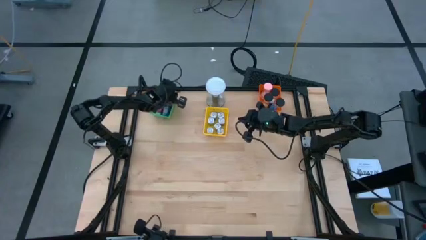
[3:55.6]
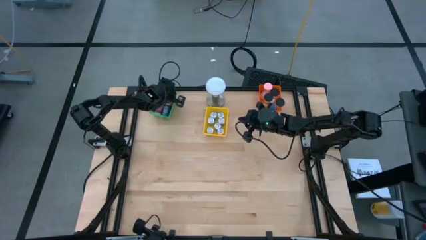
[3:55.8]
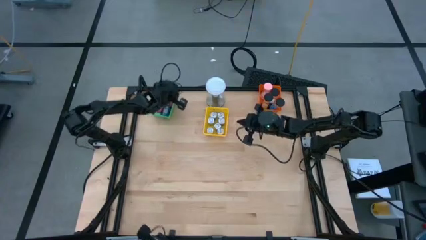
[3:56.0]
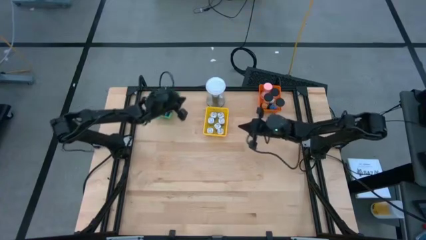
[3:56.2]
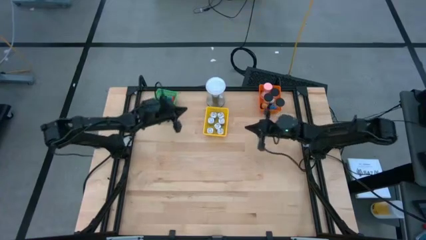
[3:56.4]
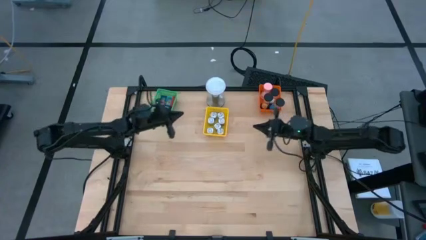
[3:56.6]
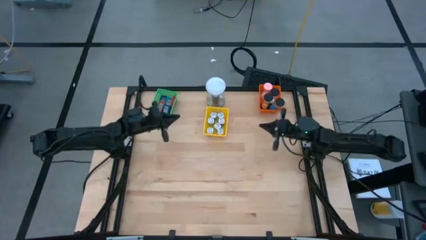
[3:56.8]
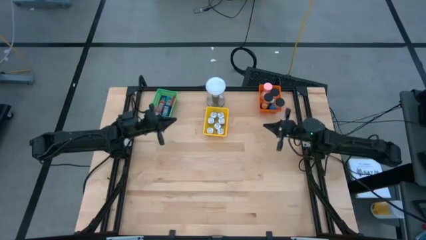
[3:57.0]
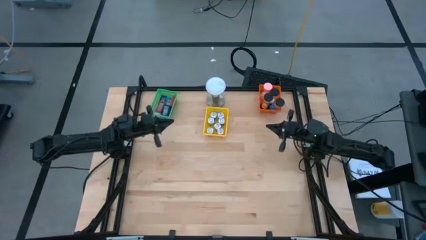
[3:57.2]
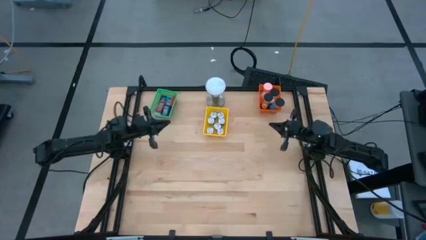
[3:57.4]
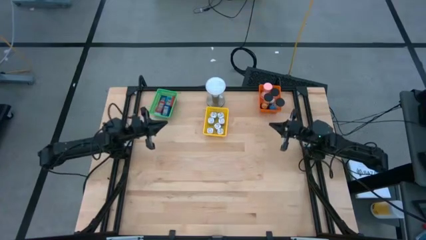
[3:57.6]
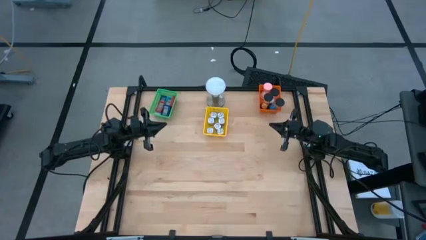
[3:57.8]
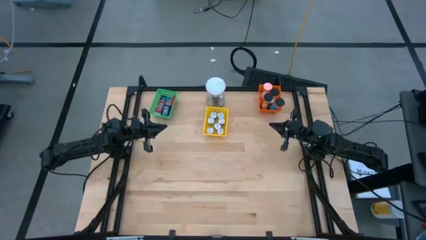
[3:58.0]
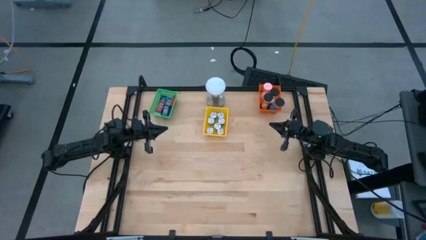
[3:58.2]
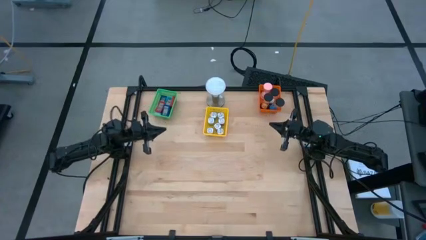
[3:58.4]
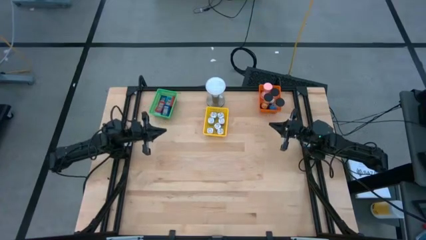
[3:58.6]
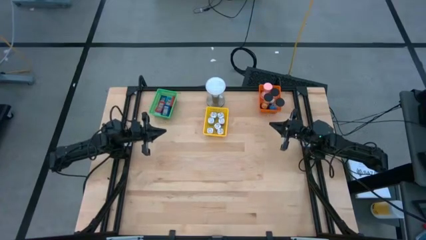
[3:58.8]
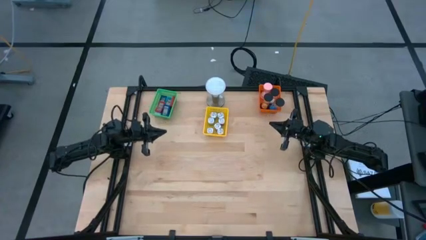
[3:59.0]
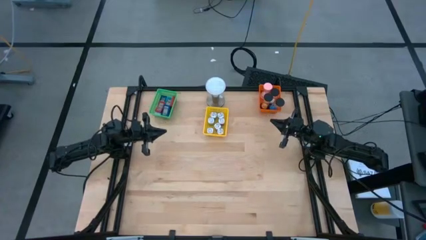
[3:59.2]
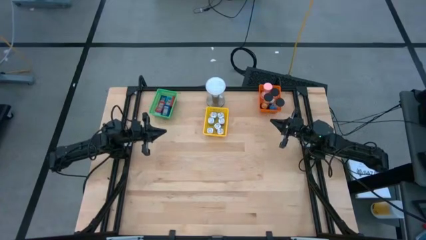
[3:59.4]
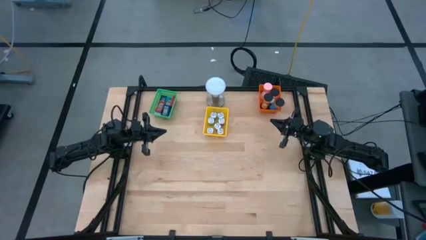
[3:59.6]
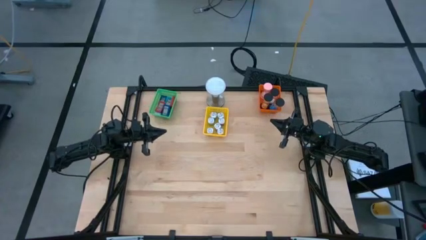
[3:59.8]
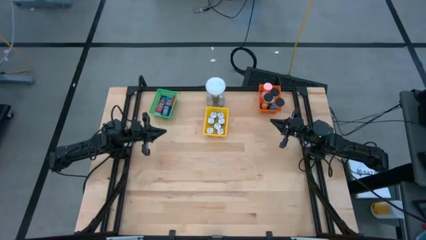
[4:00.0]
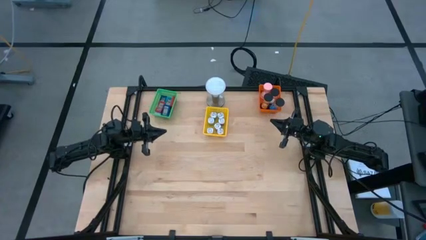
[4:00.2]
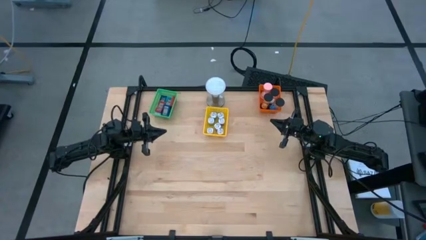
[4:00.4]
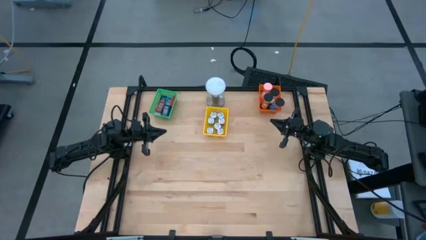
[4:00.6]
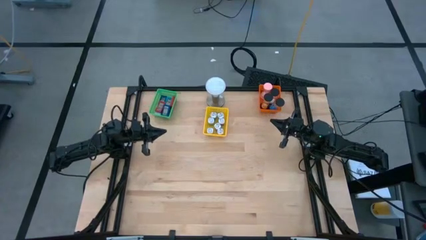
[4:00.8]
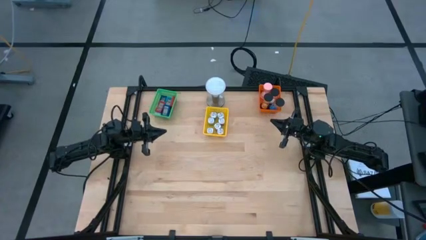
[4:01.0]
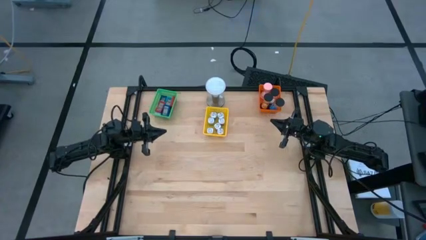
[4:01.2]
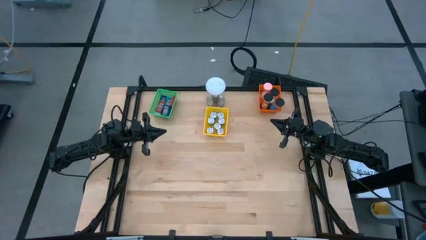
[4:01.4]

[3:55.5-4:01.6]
Task: Pick & Place Office items
Return to Home Position

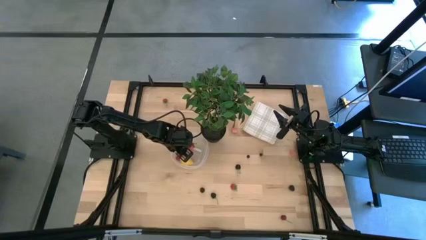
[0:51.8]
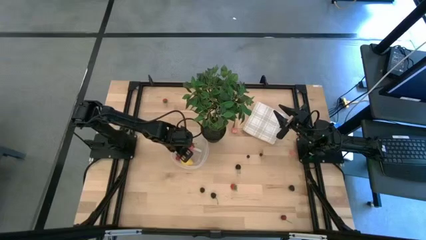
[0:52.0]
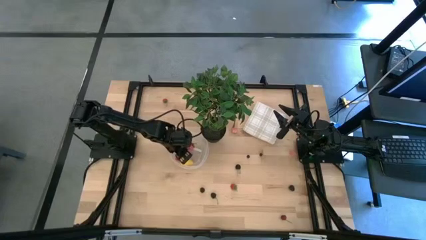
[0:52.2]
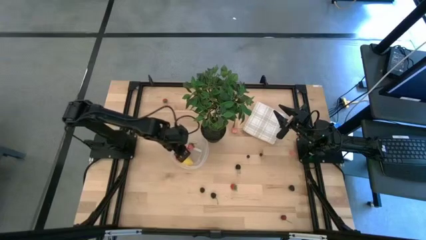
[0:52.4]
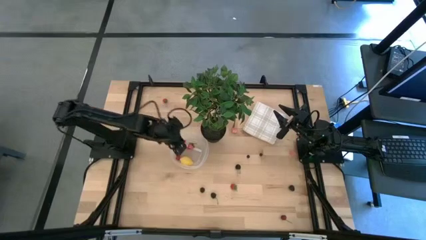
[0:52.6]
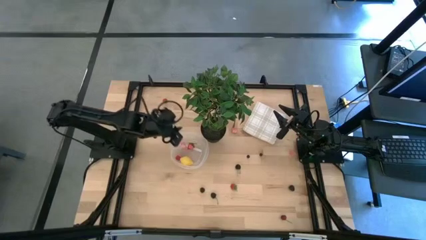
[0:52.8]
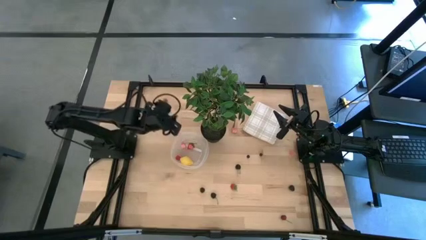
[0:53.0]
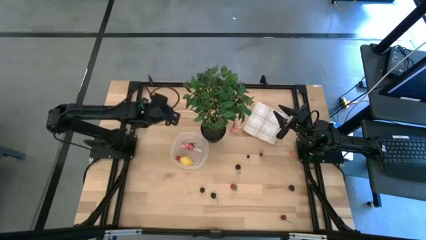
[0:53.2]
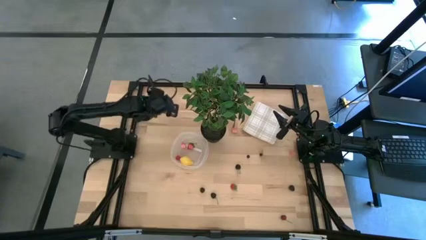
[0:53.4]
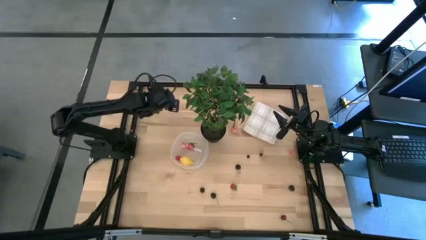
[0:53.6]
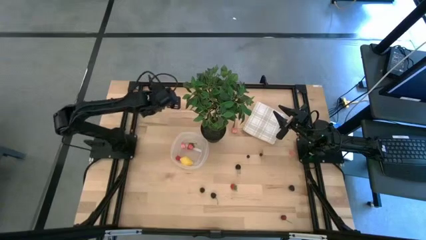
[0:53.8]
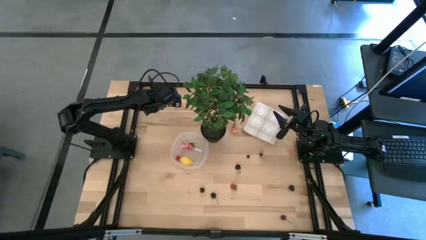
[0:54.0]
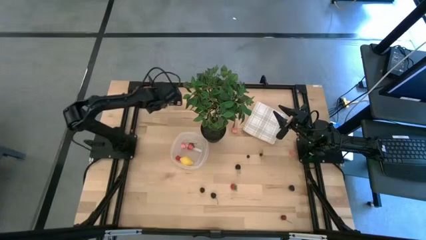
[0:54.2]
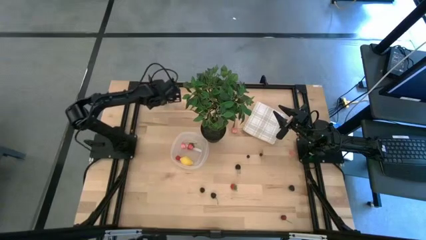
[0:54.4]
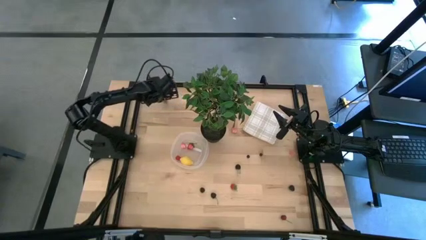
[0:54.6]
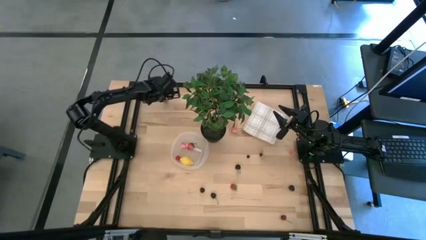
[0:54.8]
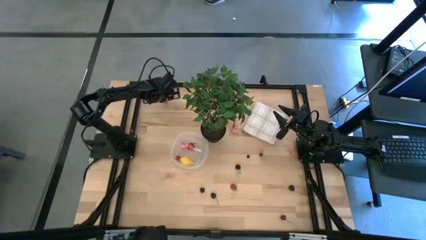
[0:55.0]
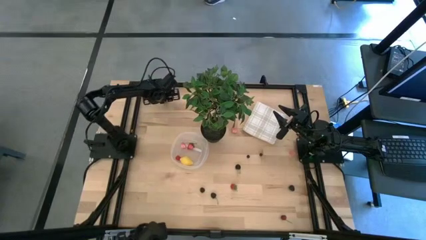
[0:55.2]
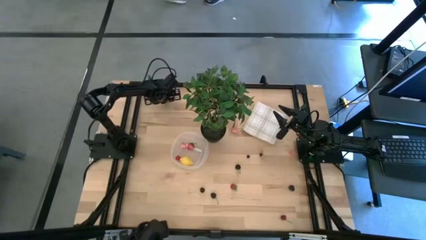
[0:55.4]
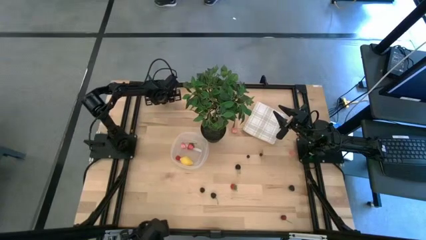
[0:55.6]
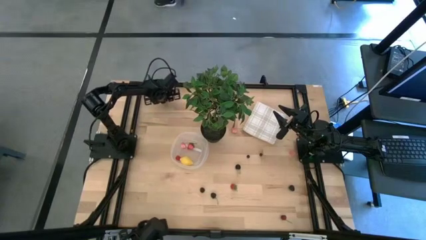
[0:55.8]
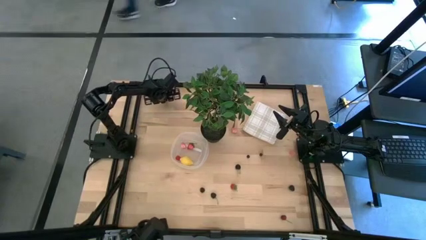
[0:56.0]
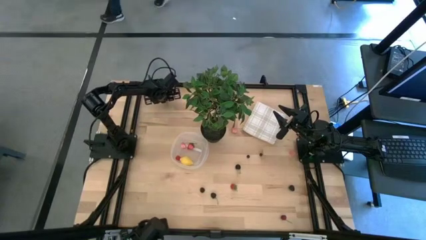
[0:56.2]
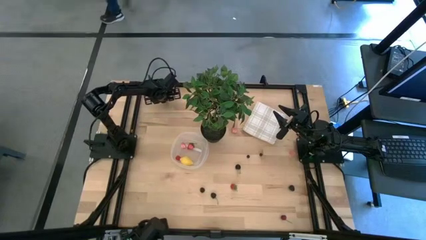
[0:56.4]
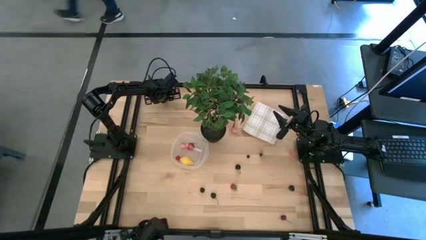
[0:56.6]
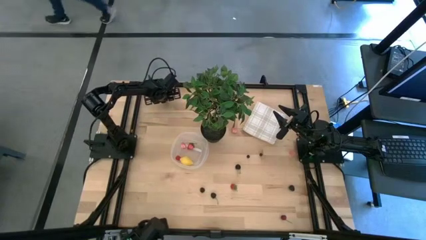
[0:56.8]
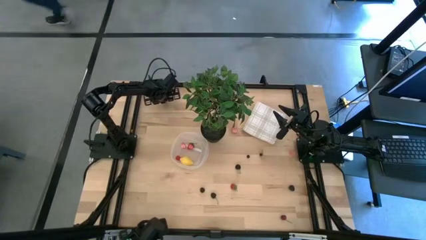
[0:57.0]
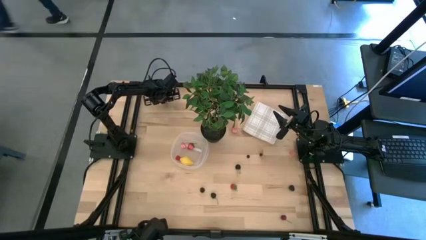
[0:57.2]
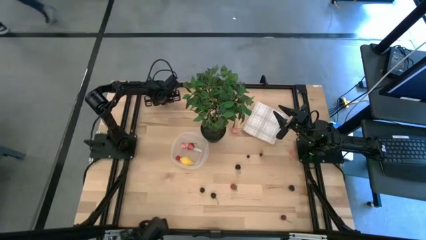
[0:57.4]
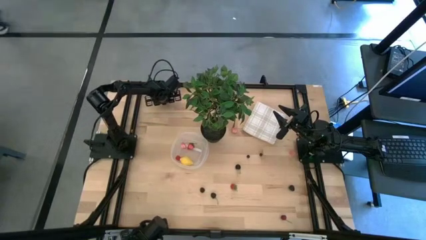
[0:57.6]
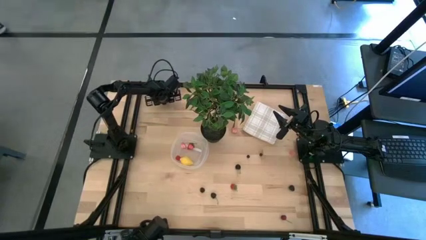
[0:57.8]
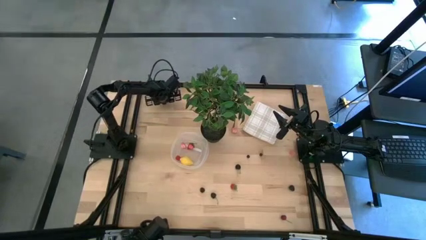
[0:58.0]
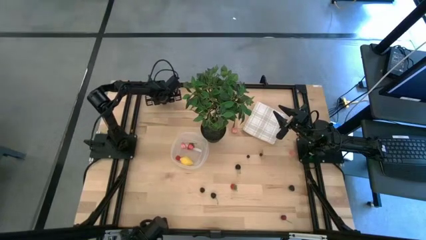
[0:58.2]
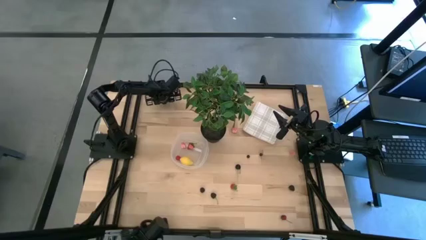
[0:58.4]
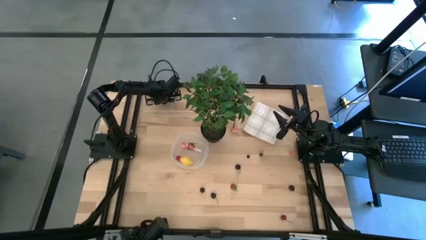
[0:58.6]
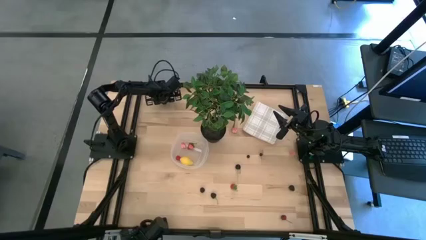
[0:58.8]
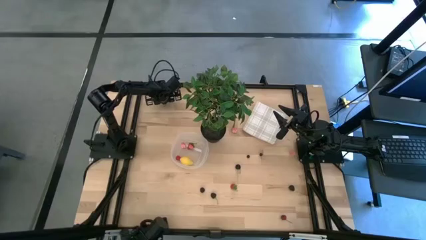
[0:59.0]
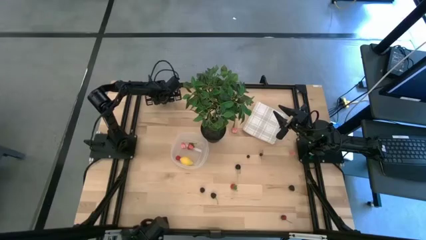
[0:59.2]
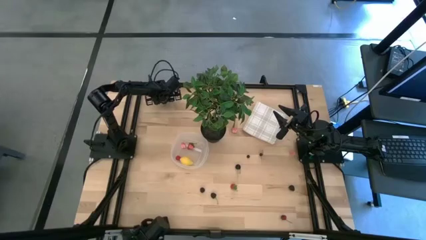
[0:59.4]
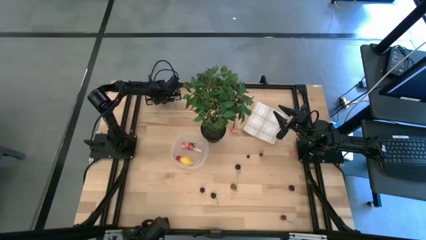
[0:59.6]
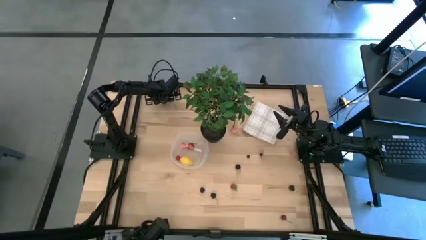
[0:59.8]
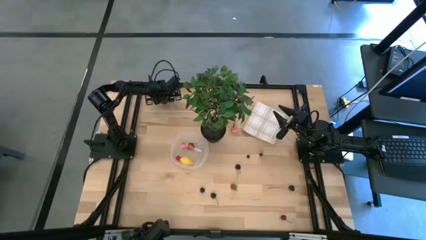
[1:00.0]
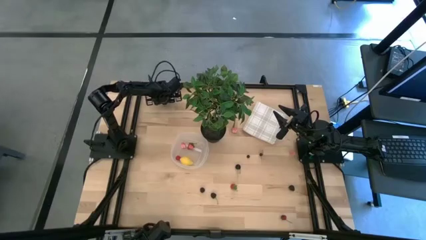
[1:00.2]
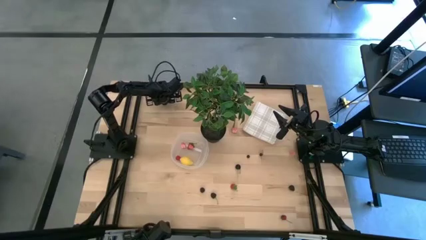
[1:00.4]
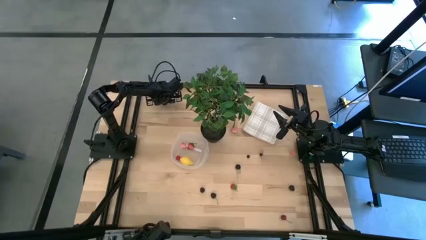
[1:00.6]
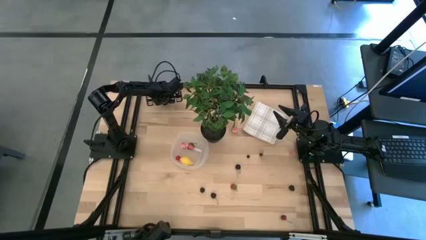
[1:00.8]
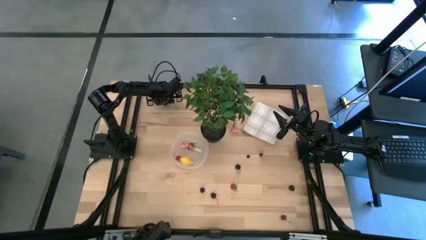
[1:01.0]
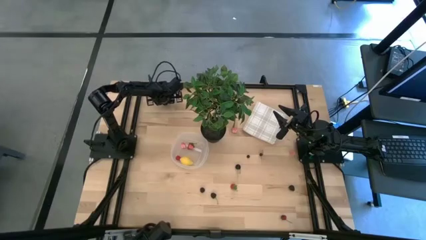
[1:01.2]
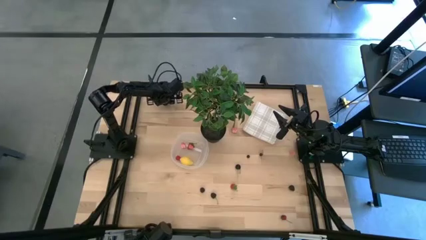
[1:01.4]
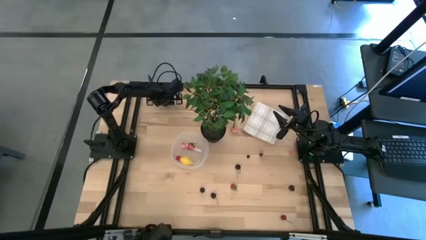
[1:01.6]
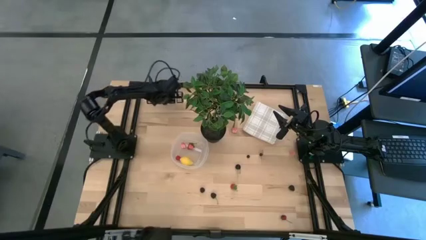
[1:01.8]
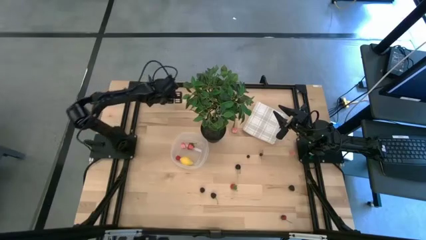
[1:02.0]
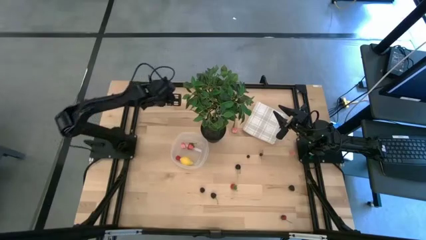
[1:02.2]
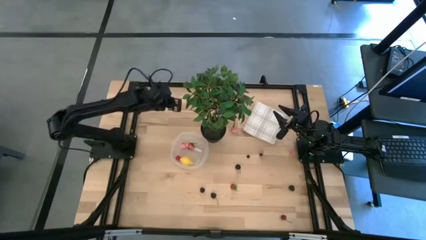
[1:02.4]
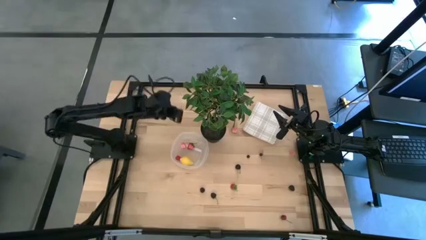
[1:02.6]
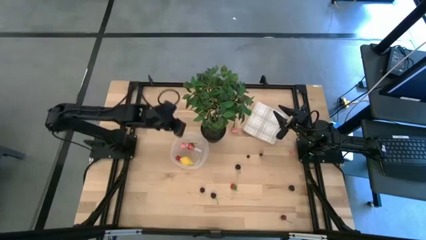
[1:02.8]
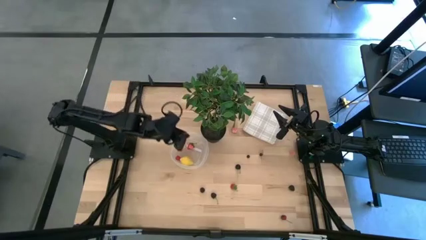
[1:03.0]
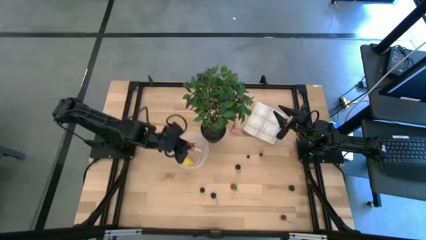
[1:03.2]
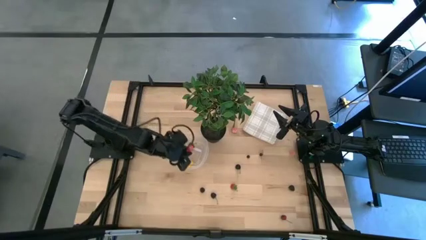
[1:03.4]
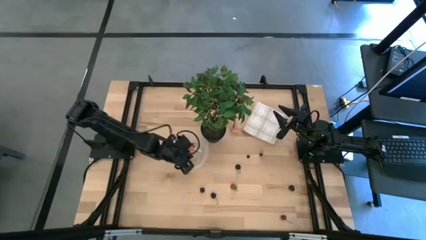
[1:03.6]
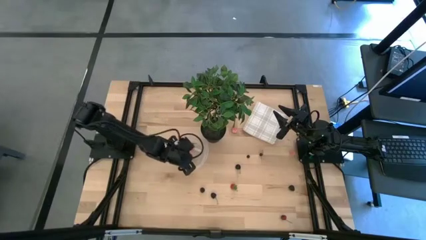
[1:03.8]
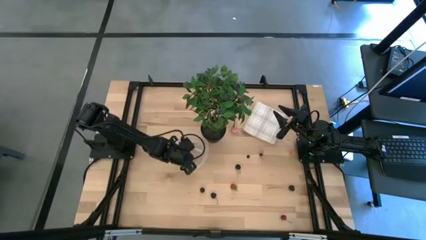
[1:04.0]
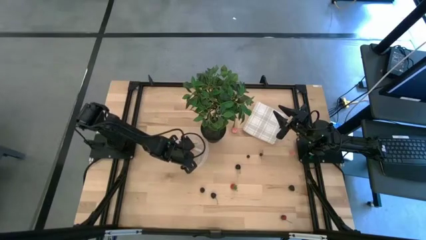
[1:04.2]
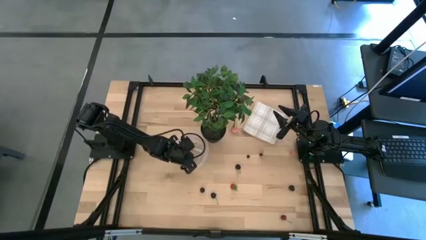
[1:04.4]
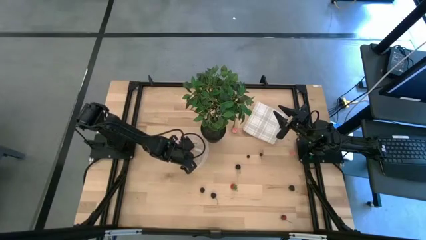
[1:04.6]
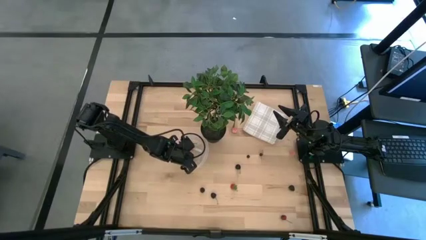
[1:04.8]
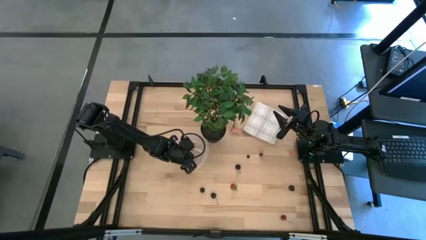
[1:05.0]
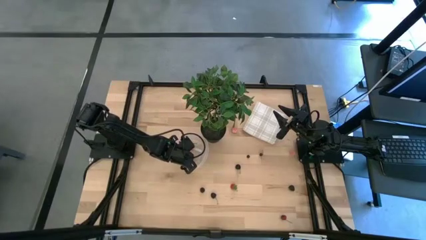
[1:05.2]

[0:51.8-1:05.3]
Task: Pick and placing Produce into tupperware
Put the top red strawberry into the transparent bin
